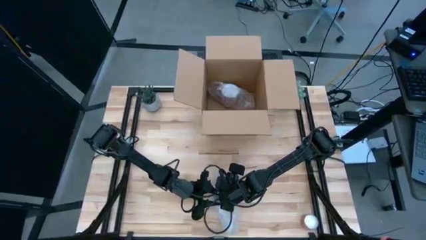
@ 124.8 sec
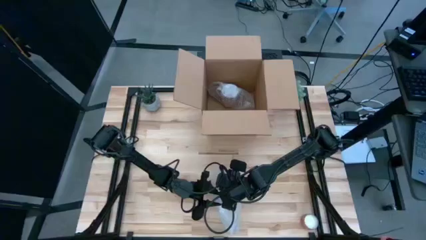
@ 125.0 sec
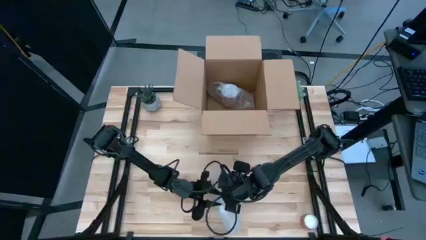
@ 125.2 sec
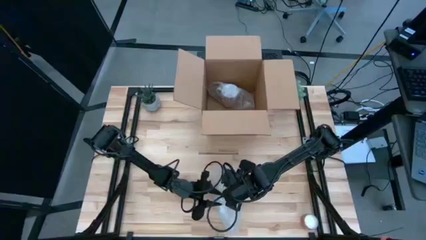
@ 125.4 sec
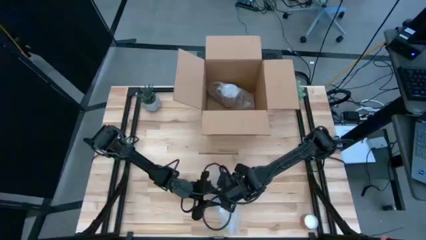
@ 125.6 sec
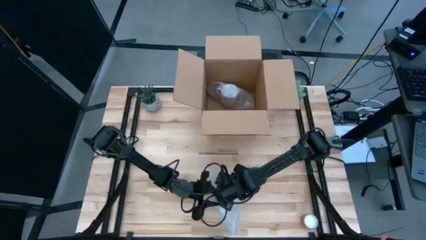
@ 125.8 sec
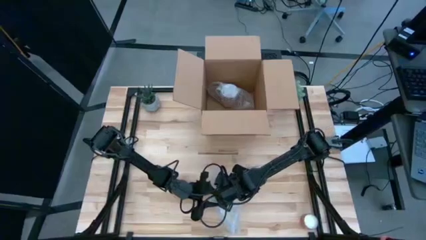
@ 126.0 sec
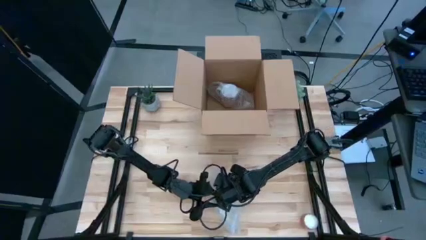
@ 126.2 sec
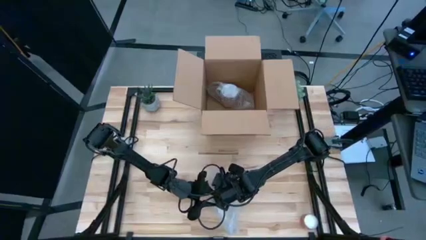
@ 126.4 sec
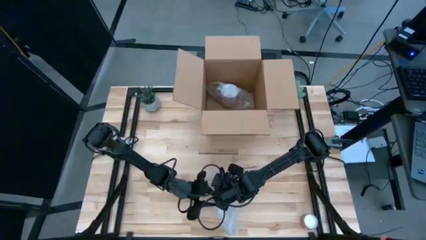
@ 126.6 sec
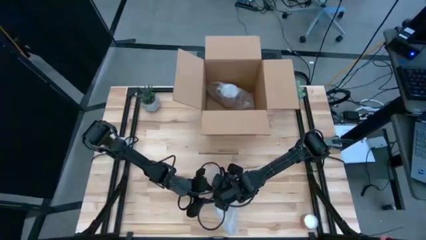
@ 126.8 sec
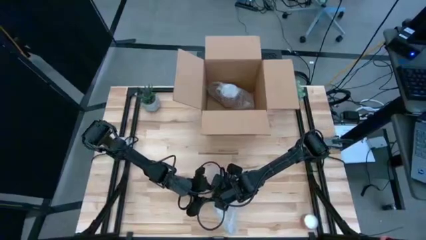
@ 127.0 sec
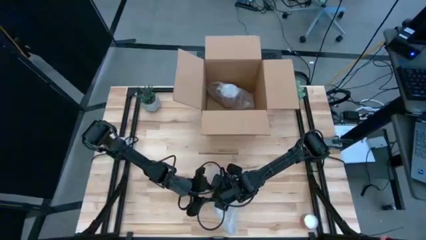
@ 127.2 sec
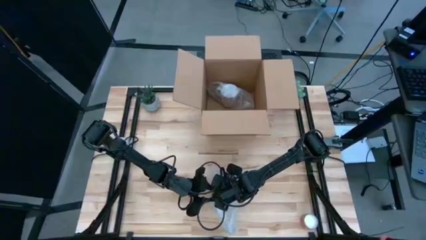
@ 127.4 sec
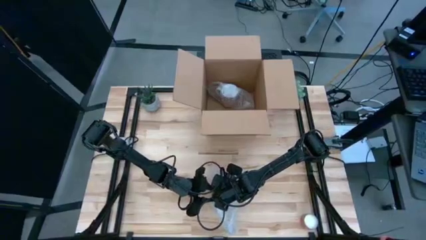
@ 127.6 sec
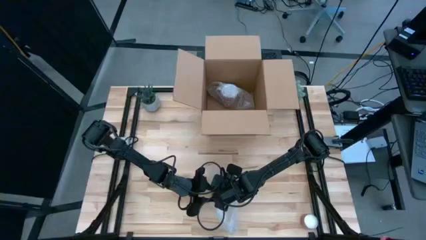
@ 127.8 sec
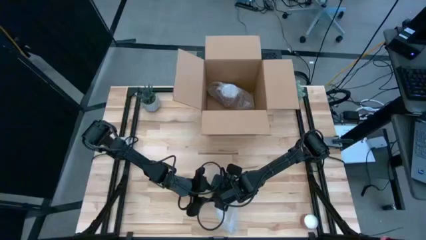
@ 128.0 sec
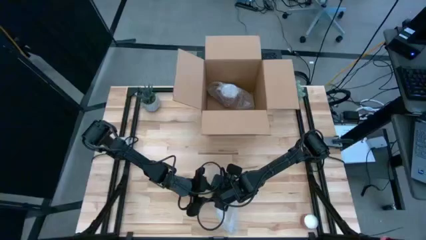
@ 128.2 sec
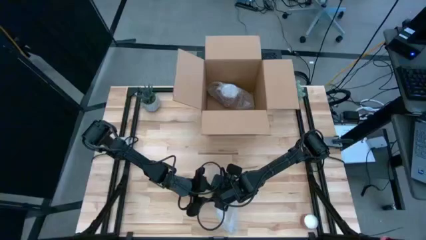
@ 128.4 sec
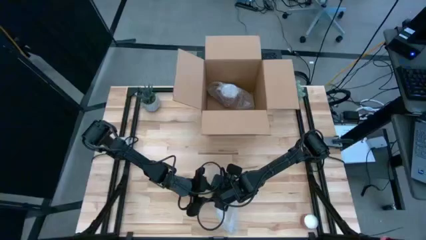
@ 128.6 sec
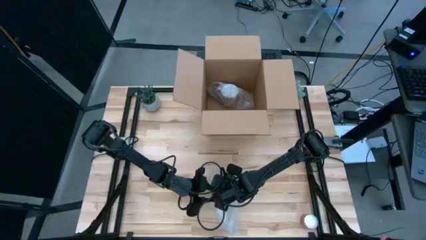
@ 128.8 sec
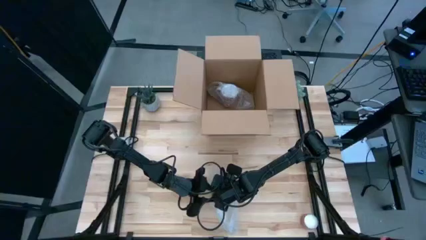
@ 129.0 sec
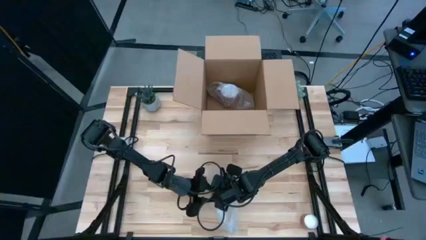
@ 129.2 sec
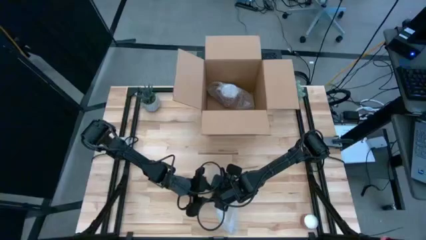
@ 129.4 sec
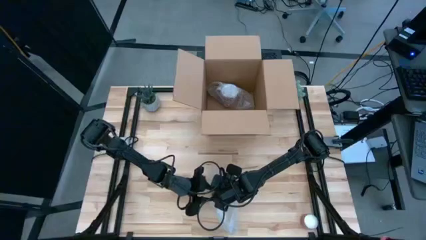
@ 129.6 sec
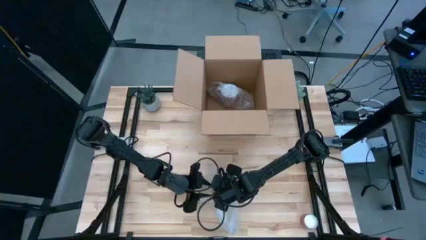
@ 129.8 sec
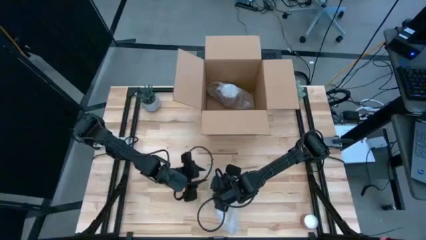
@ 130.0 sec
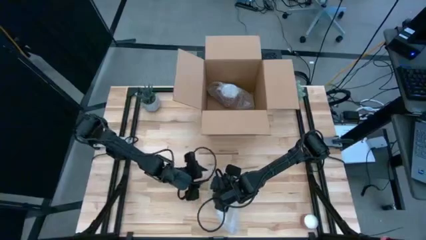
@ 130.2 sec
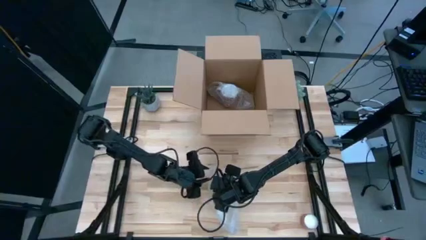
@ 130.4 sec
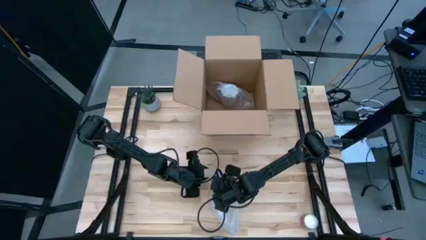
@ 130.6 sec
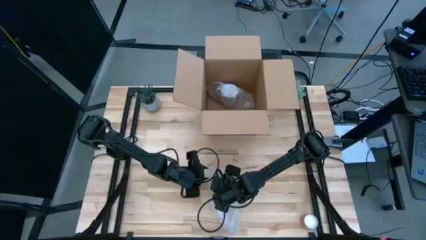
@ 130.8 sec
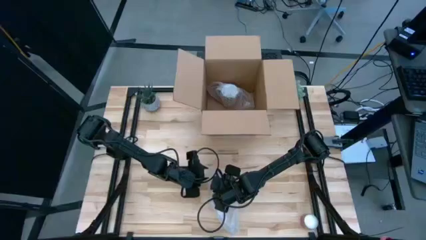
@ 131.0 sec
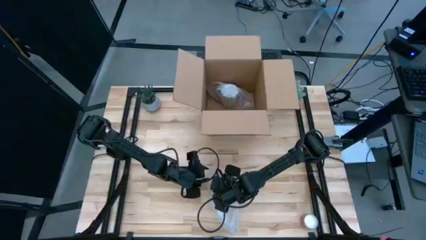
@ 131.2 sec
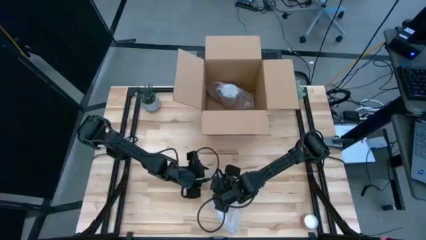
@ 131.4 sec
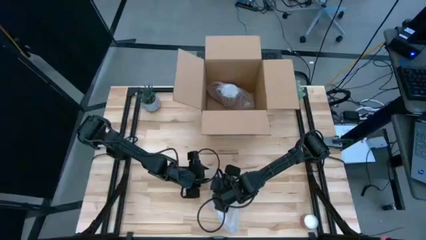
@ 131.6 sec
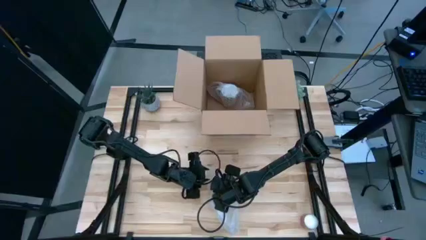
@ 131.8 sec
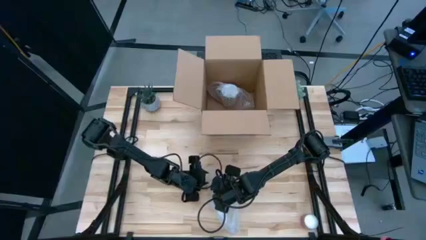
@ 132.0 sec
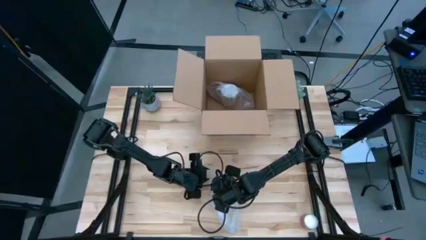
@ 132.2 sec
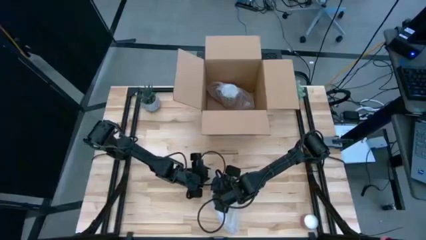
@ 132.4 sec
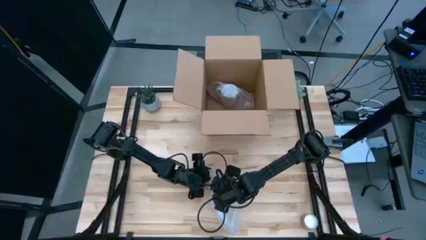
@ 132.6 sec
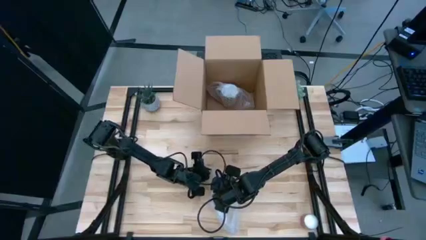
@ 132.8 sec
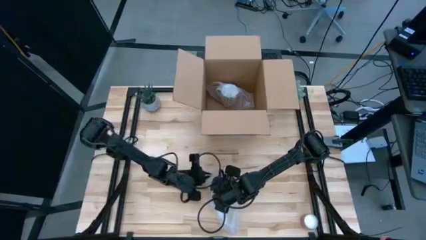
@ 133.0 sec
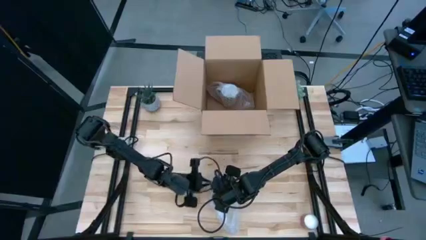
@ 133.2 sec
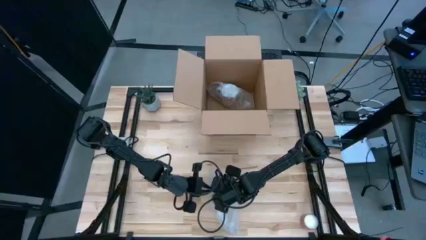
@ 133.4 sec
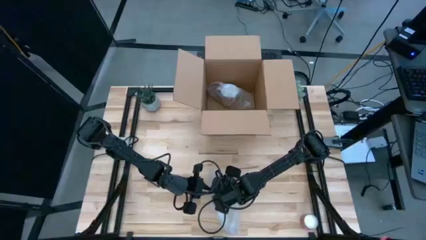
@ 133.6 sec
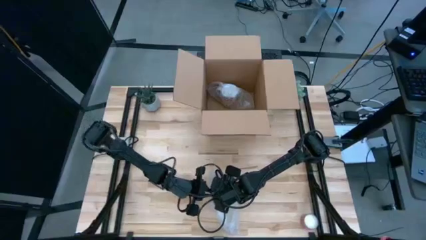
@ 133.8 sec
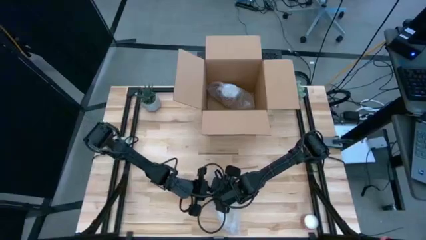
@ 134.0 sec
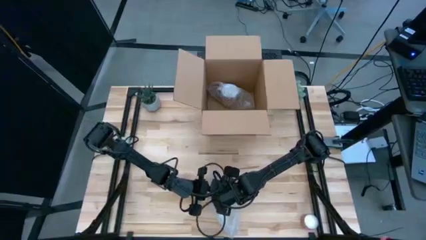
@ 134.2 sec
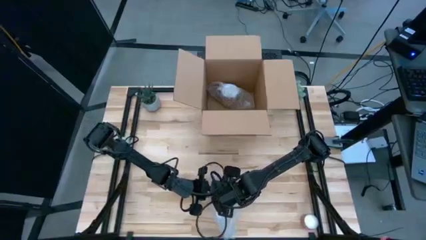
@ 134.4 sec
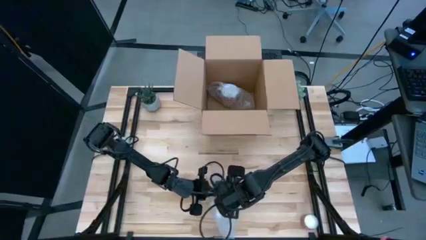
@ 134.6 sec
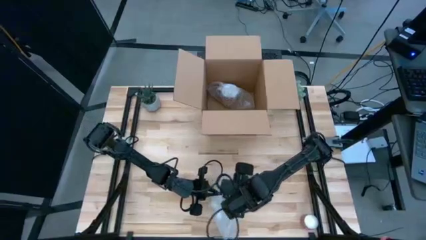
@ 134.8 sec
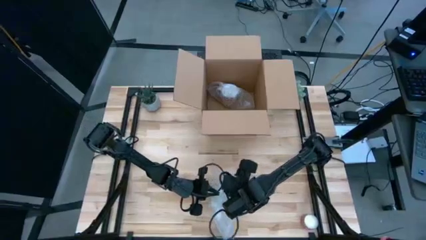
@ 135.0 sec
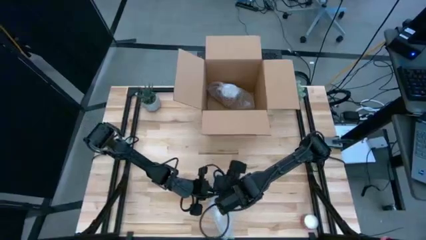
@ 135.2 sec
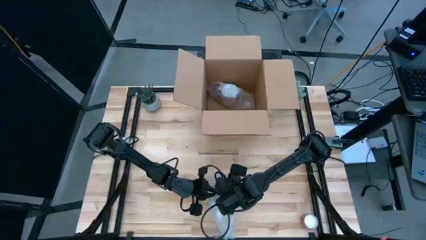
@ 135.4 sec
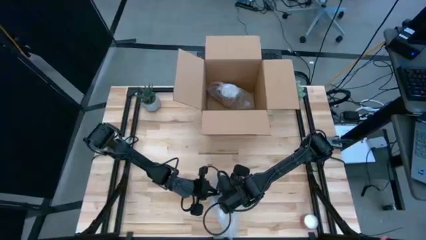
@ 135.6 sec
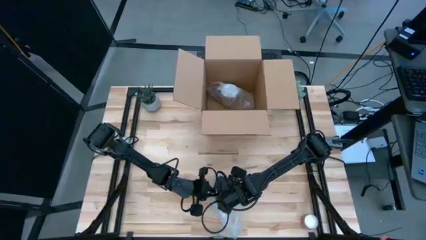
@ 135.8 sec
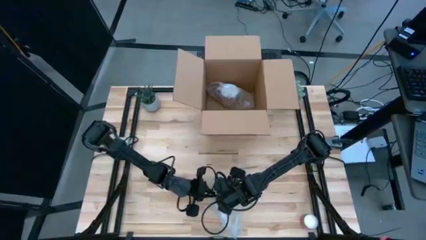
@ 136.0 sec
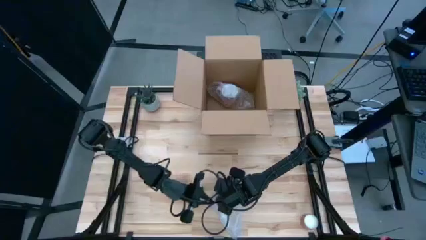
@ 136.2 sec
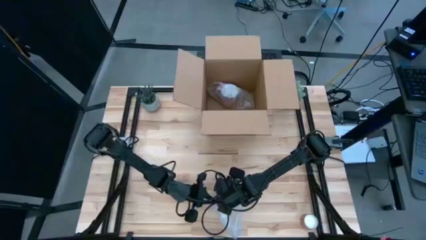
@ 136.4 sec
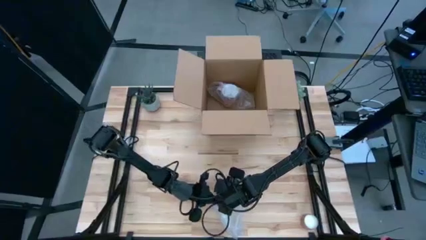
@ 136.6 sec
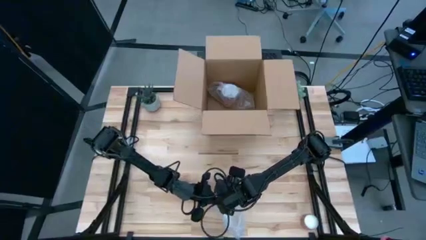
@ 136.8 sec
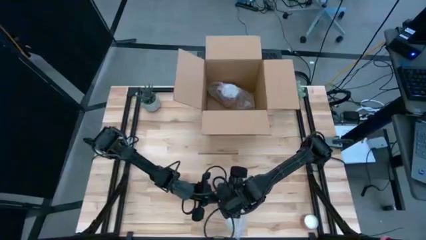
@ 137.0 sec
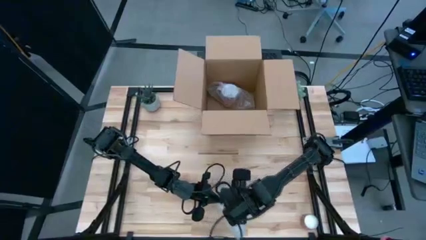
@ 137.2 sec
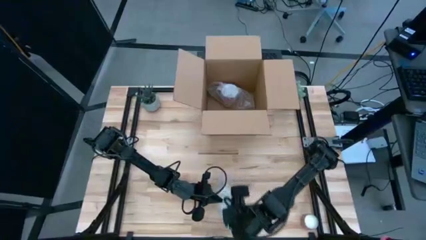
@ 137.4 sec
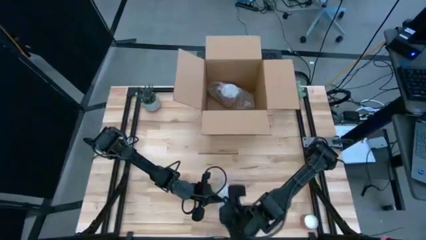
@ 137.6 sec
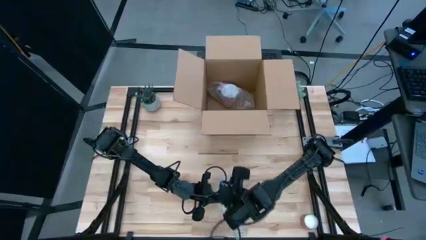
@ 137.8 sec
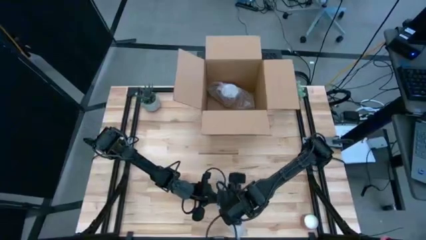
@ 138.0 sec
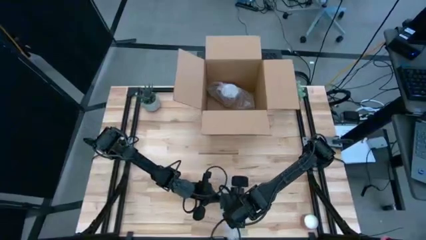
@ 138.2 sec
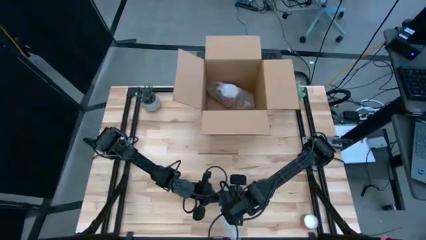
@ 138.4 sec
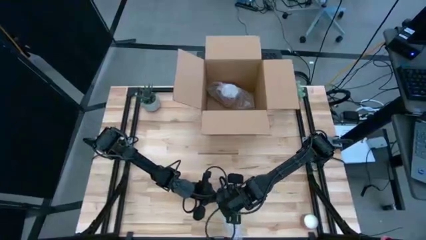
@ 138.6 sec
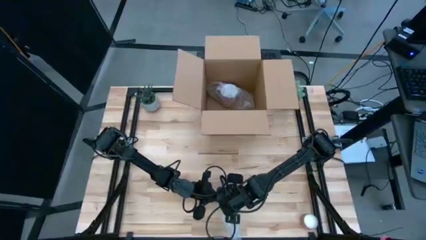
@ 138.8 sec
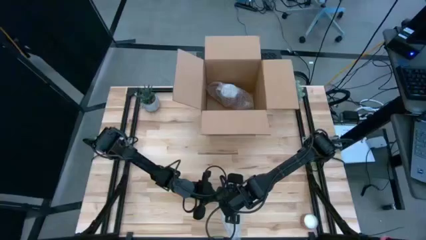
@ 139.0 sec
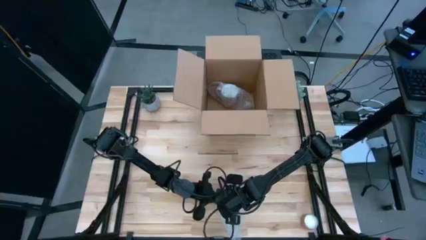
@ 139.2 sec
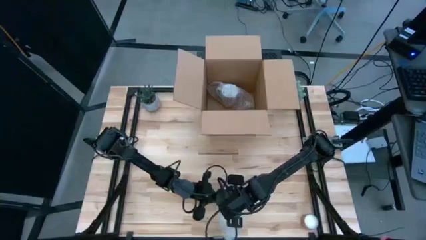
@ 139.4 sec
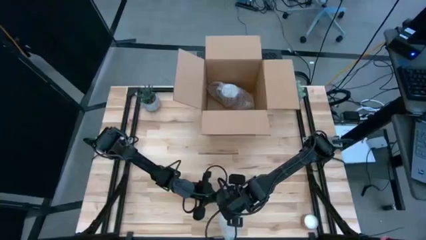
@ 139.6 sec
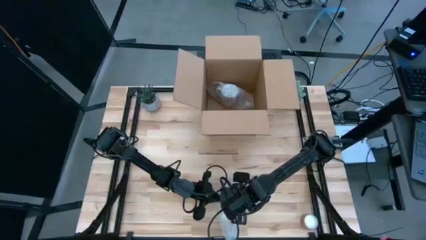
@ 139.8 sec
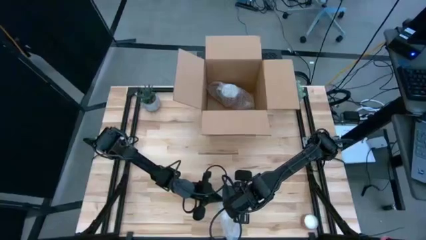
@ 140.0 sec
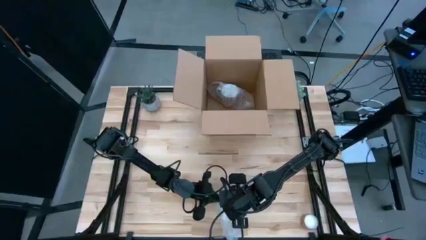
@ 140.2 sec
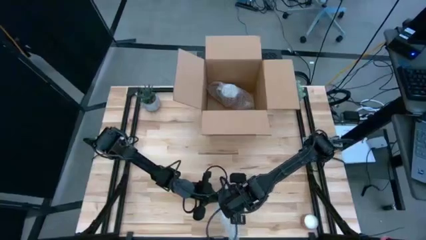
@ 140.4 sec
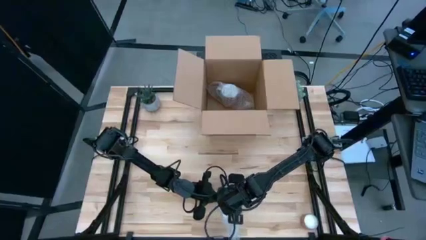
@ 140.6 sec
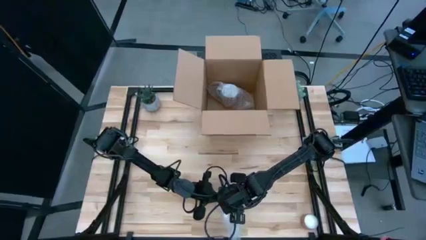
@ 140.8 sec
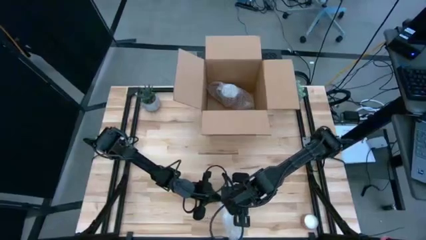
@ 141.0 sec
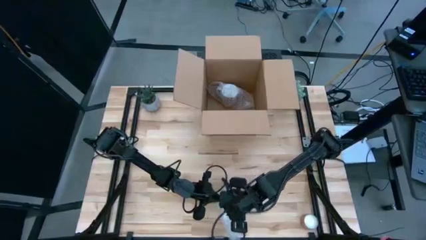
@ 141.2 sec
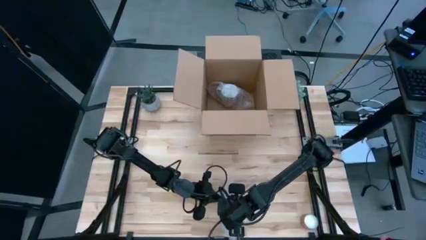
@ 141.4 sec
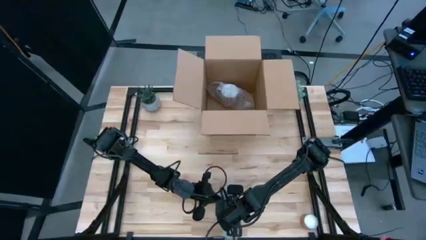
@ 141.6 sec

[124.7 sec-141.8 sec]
Task: wrap mug
Wrap the orange patterned mug with the transparent bubble wrap
